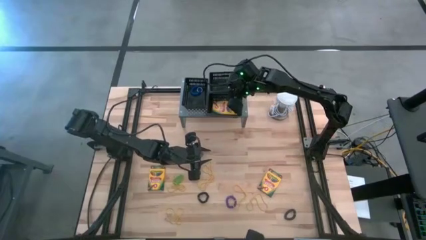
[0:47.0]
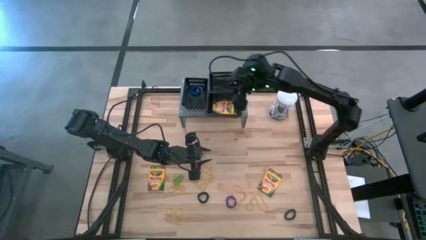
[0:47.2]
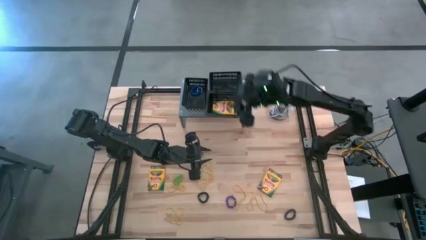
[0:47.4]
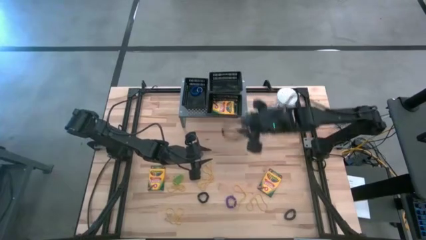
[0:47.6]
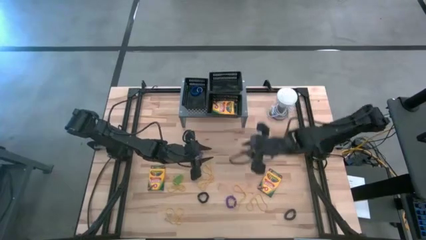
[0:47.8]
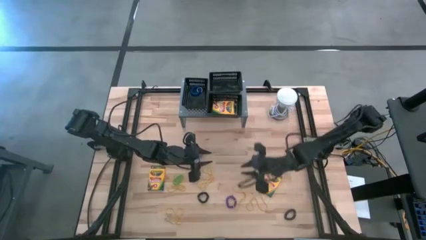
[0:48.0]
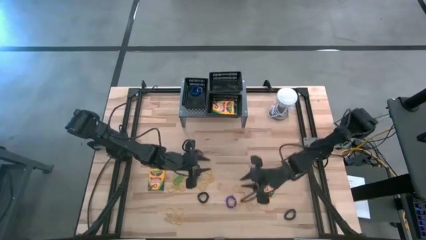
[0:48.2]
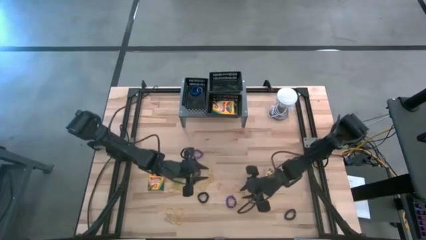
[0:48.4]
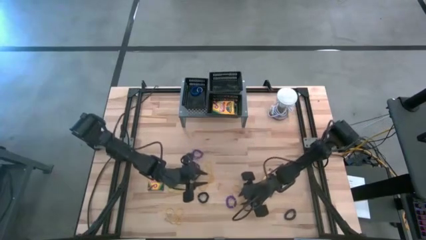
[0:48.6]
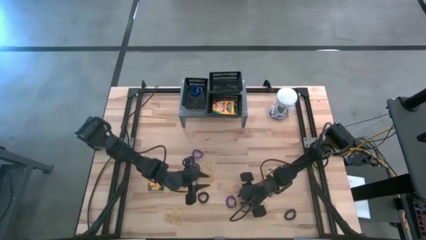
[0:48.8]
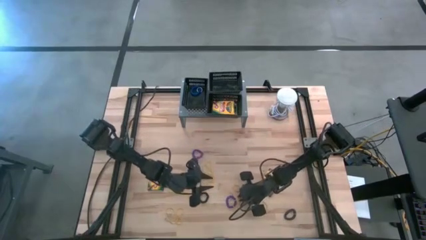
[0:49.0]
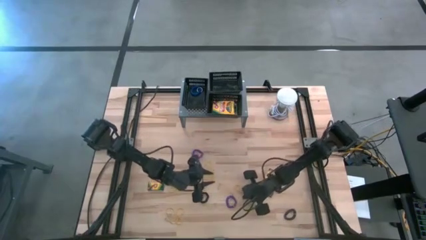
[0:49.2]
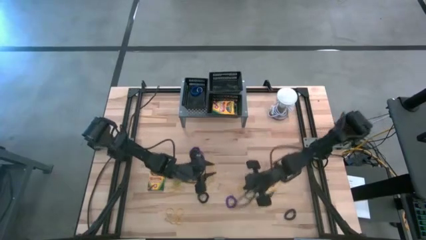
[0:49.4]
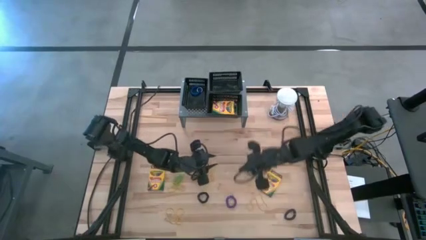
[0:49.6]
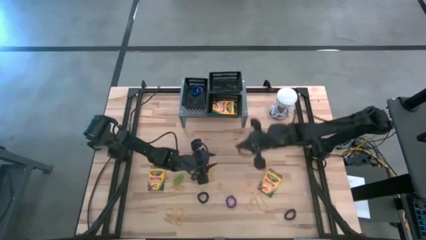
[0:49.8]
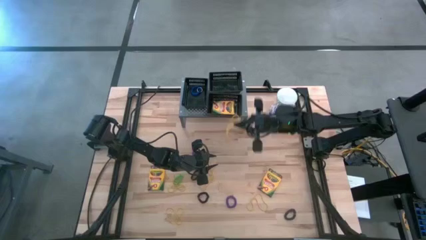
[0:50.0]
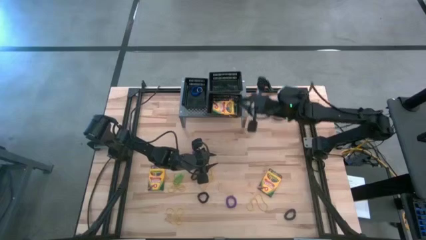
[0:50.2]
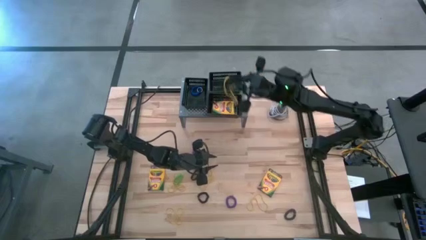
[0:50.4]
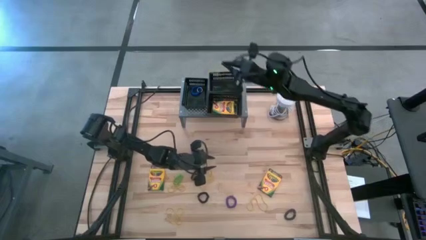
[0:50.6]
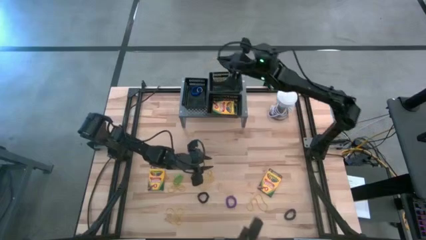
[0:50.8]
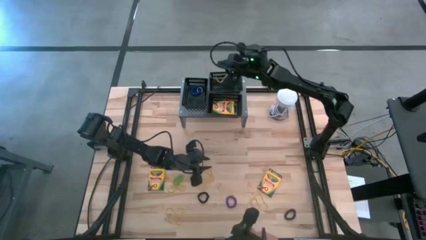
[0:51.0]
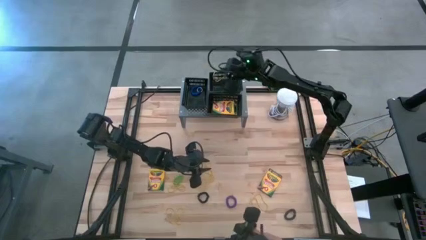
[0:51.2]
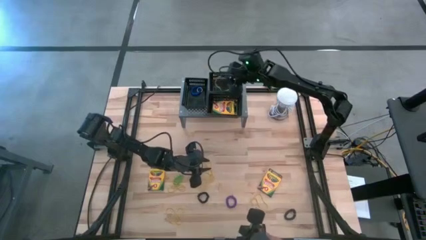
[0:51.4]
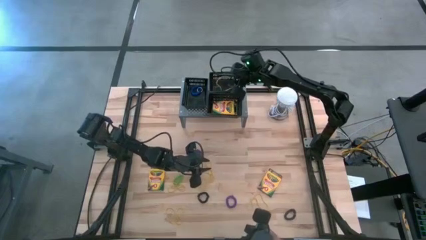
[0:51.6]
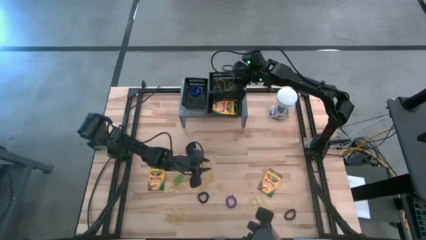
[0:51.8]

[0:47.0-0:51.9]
Task: Pick & Place Office Desk Supplies
Put the yellow rubber band into the top black bin on the shelf

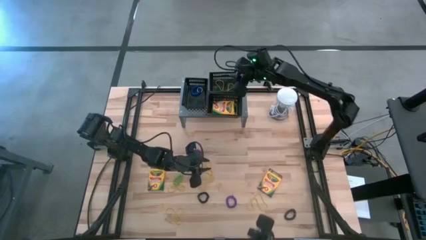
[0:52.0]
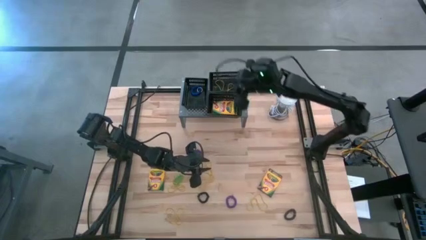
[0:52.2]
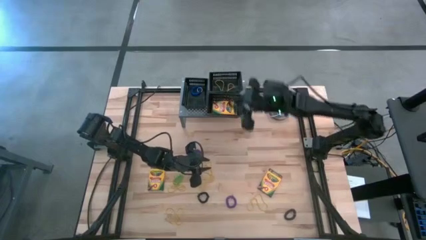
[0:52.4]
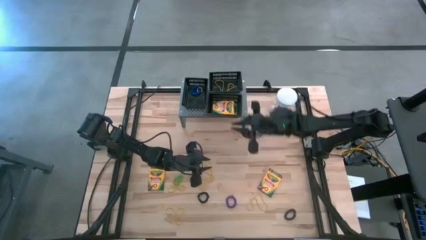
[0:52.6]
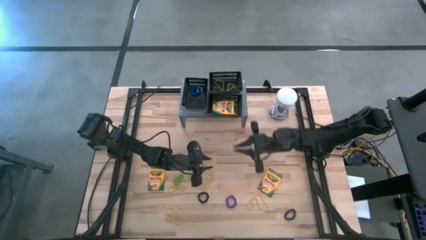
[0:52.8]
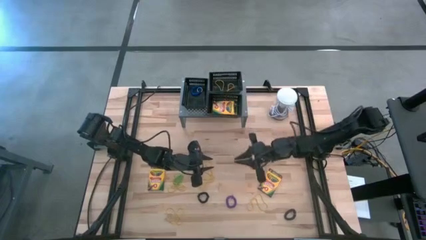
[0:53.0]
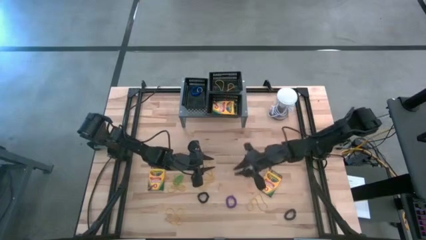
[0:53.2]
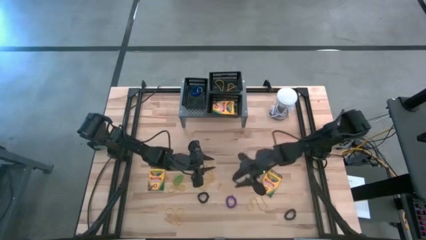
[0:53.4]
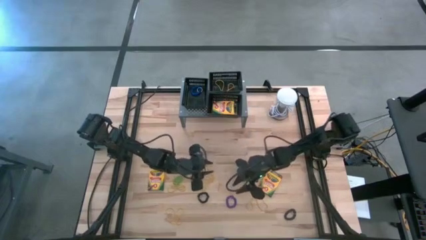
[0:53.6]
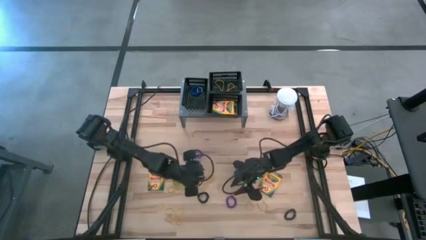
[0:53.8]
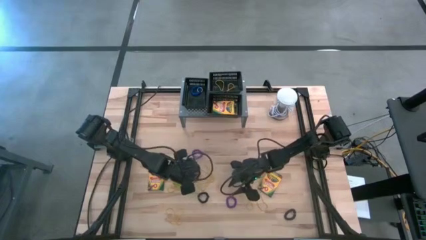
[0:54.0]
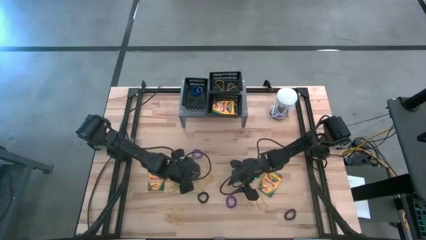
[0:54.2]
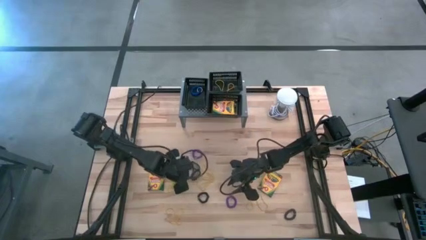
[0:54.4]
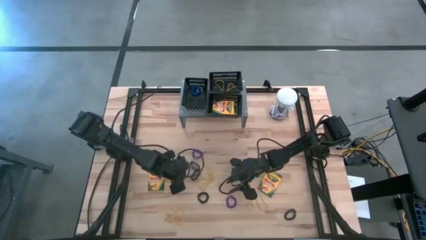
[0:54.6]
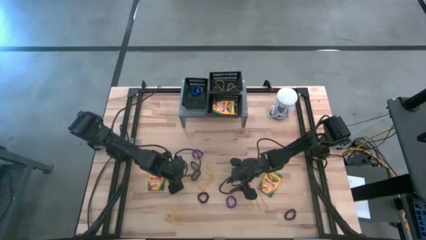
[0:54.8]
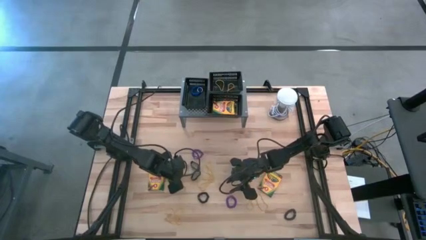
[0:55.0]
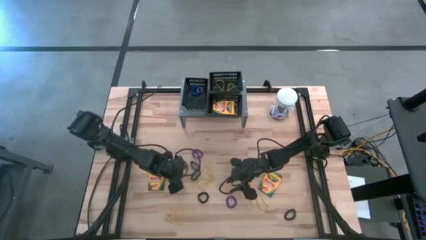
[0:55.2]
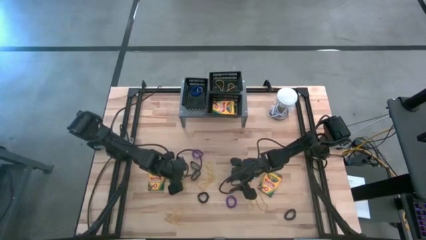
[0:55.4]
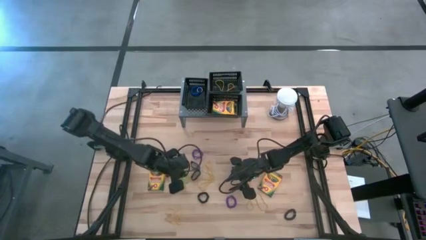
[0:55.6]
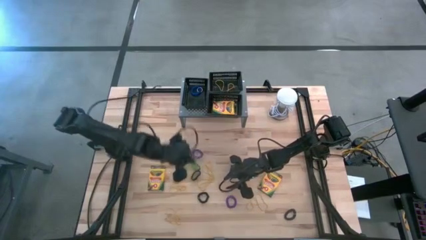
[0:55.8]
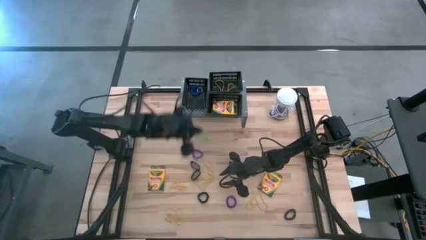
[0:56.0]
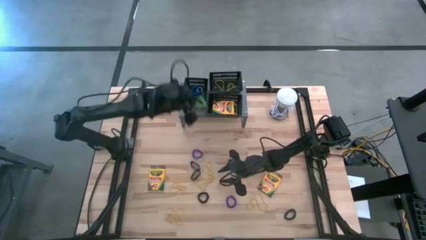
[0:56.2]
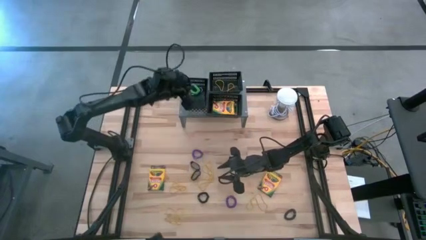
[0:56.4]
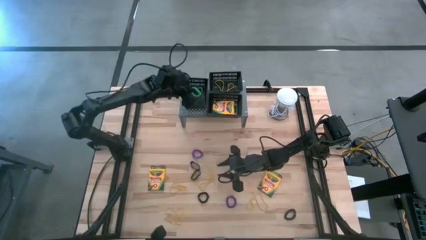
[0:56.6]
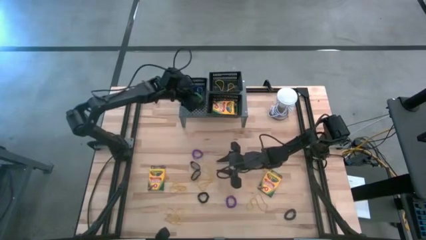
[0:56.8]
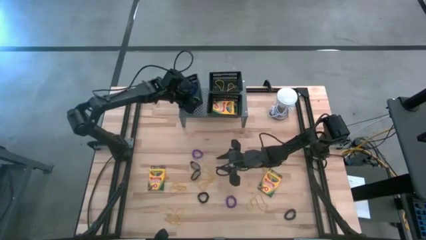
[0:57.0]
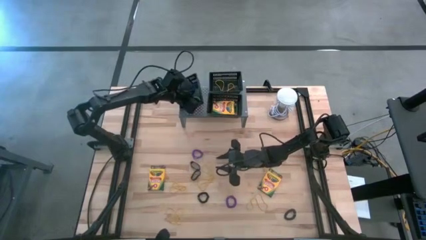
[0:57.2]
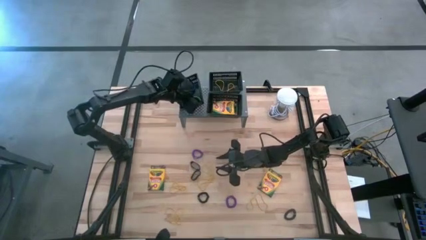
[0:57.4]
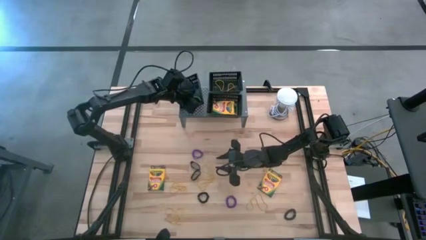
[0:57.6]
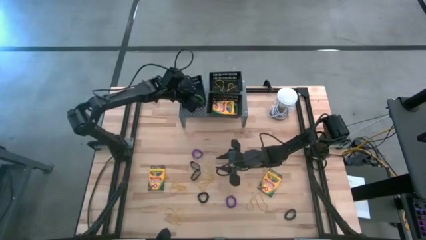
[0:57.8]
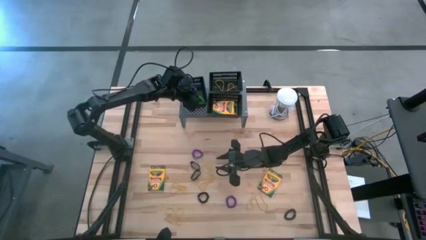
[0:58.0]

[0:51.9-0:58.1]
Put the green spring keychain into the middle black bin on the shelf

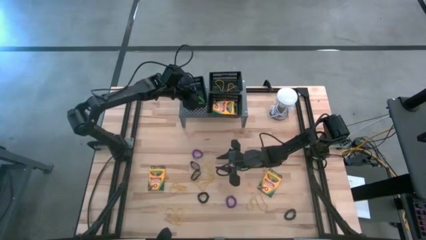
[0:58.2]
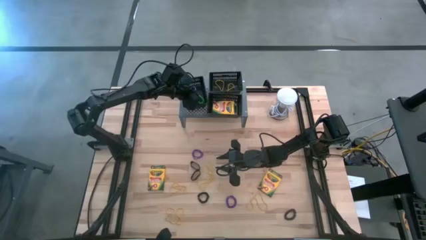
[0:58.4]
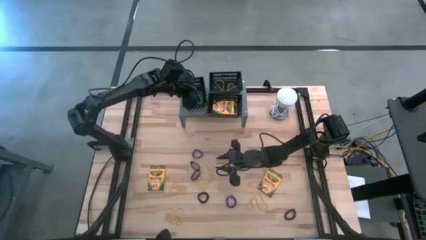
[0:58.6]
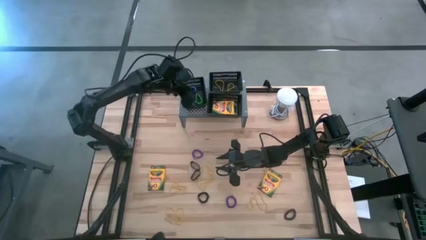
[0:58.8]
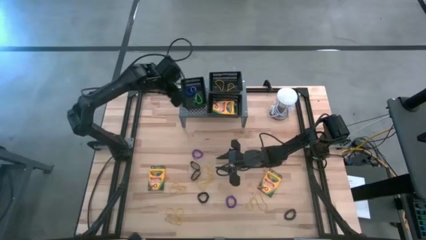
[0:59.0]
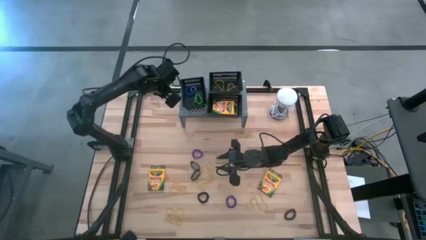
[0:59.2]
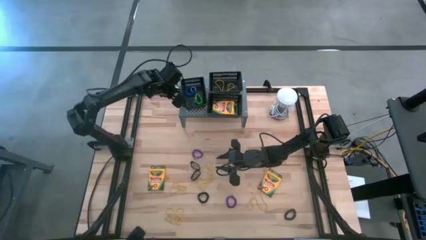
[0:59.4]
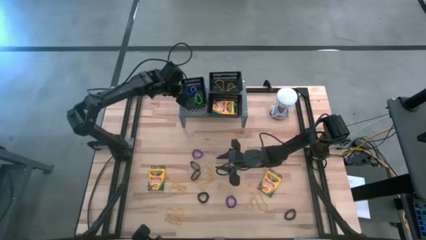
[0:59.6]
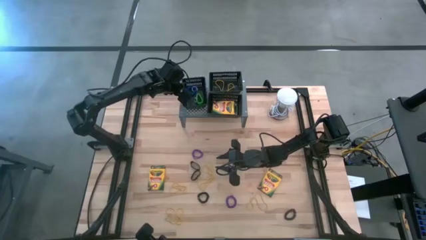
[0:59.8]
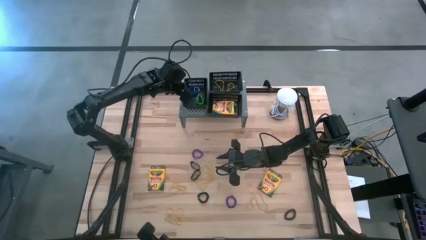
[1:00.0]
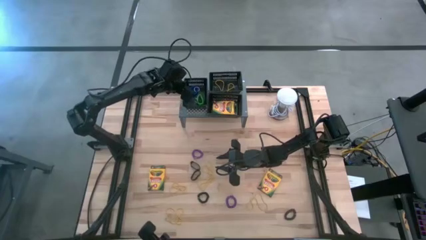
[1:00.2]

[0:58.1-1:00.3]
Adjust the middle black bin on the shelf

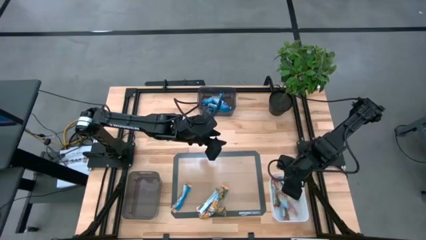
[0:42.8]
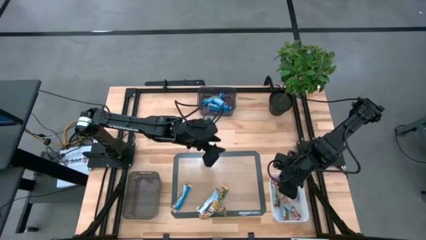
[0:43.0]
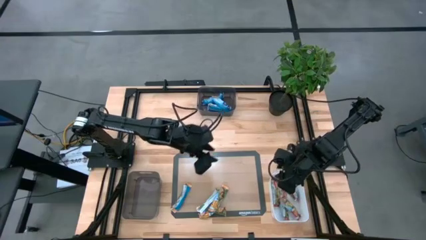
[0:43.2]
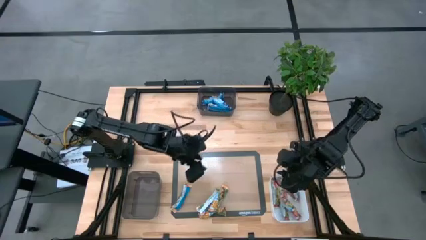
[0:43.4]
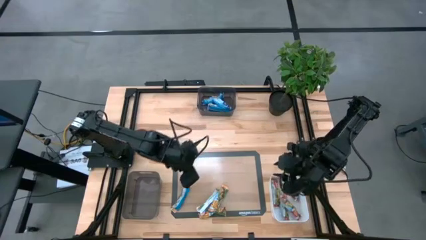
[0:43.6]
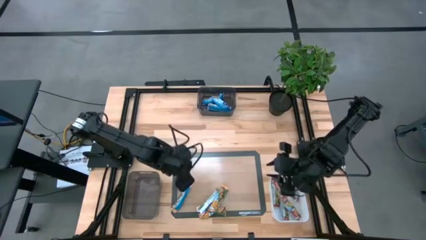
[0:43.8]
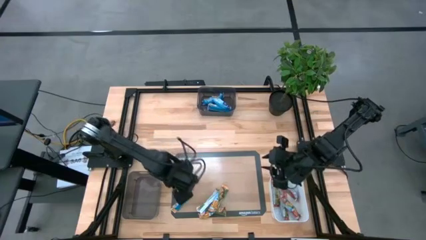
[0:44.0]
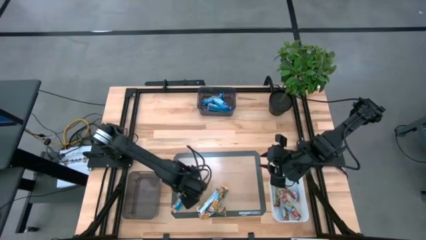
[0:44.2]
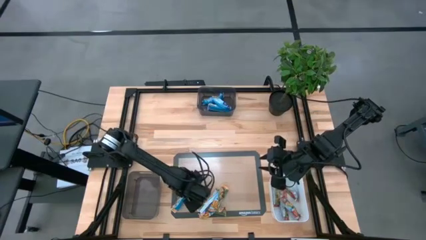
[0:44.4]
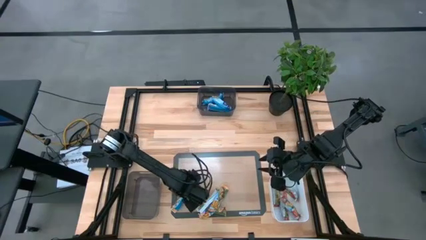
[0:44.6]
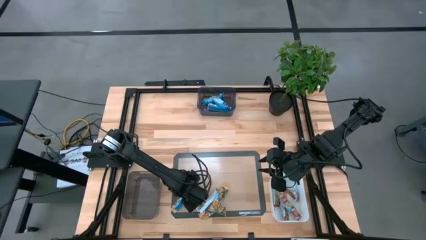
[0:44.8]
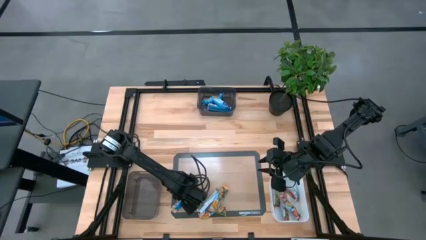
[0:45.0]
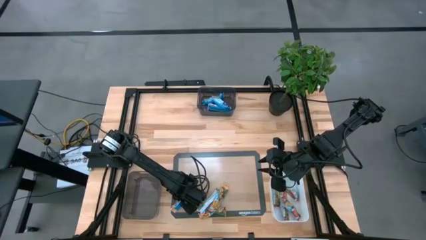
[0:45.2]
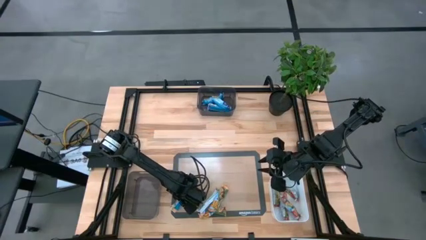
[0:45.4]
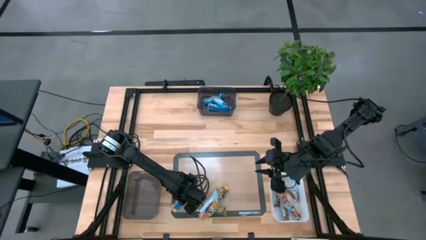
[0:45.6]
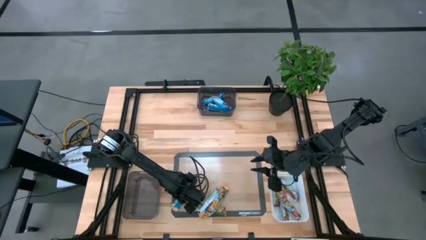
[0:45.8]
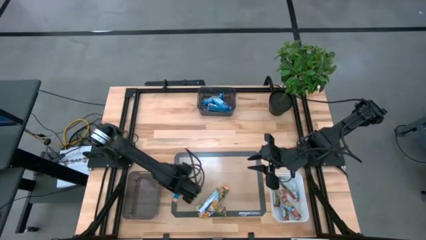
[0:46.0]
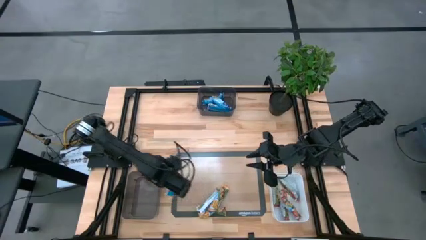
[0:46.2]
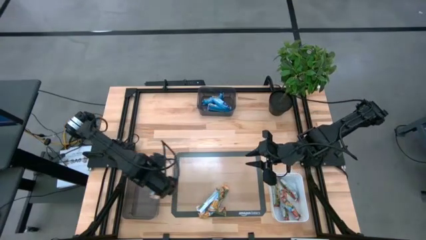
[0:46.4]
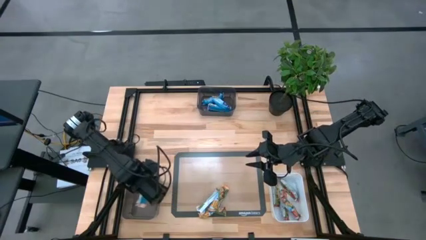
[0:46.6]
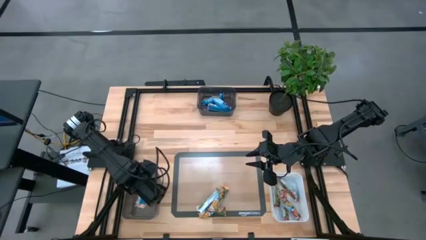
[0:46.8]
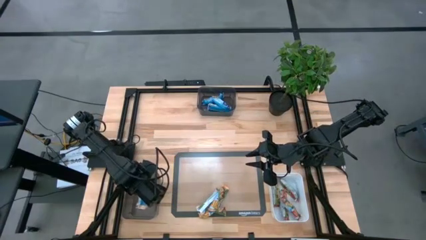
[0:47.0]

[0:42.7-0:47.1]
Task: Pick and place Granola Bars by type
Put the orange granola bar into the bottom black bin
